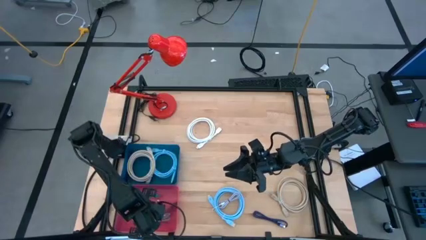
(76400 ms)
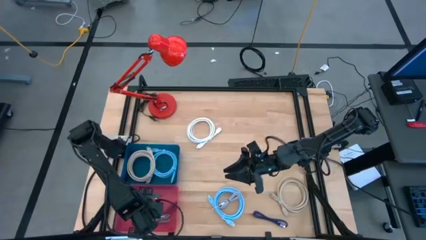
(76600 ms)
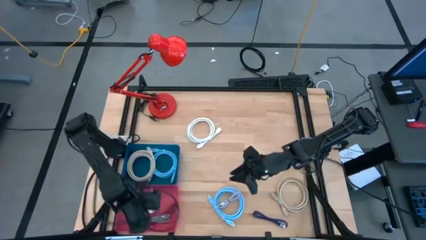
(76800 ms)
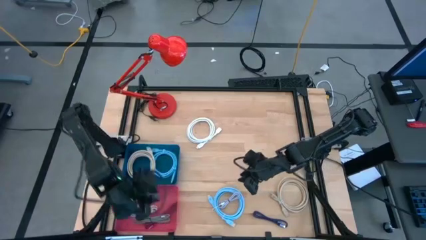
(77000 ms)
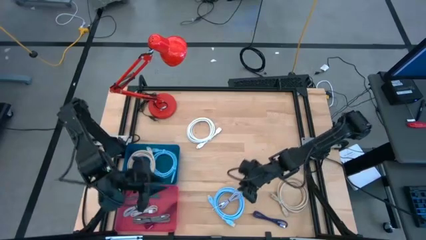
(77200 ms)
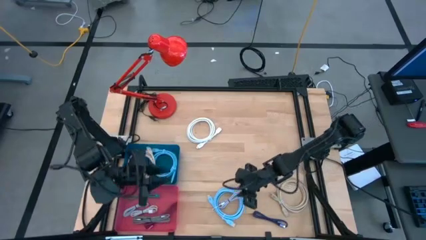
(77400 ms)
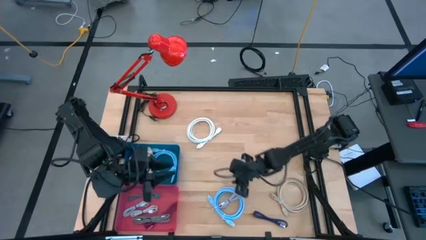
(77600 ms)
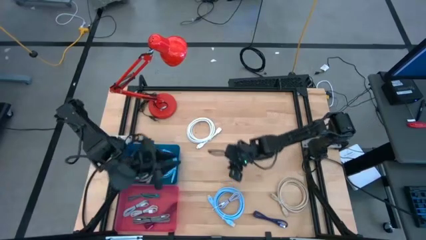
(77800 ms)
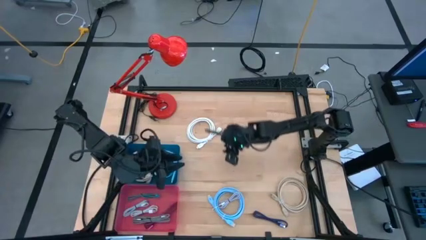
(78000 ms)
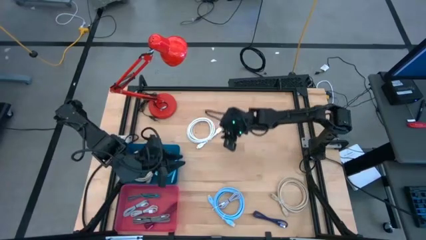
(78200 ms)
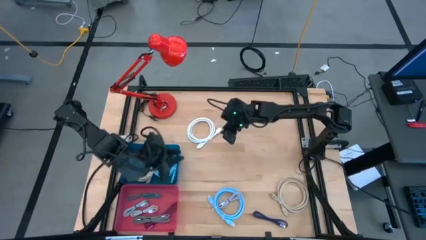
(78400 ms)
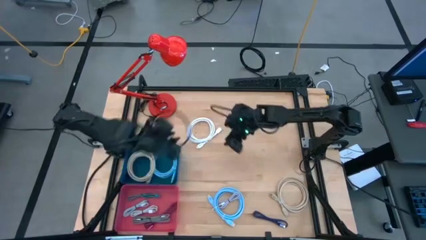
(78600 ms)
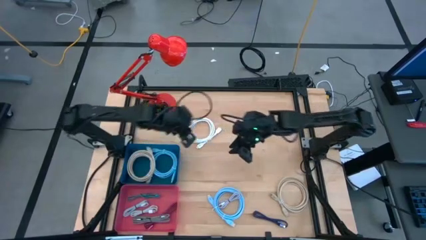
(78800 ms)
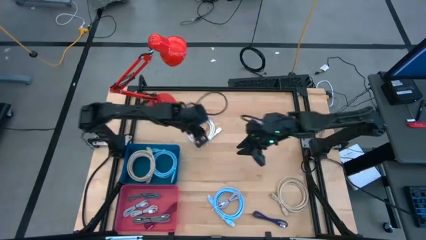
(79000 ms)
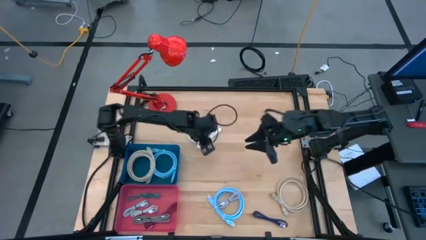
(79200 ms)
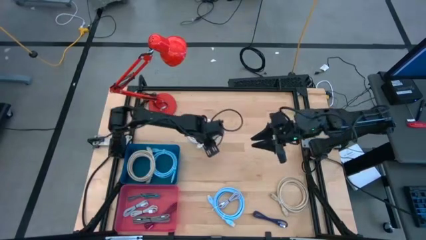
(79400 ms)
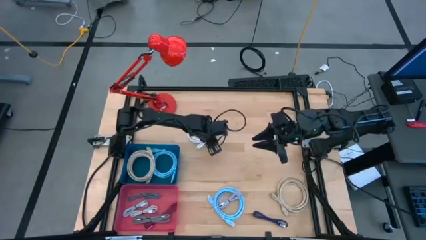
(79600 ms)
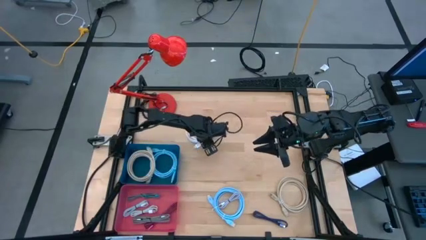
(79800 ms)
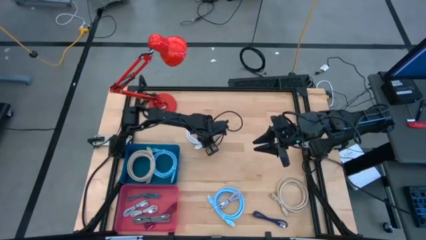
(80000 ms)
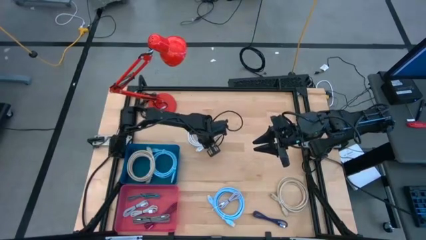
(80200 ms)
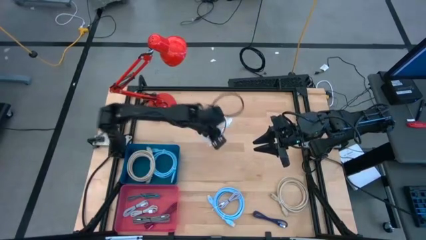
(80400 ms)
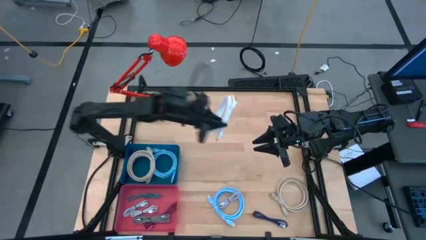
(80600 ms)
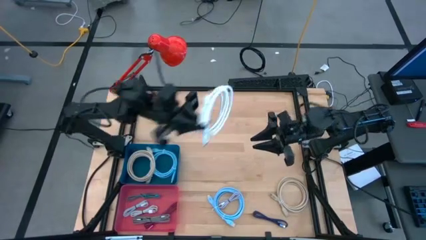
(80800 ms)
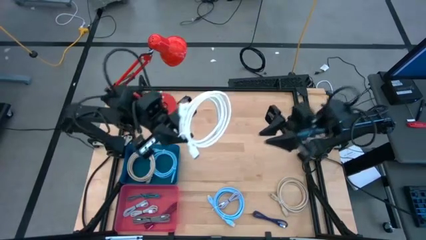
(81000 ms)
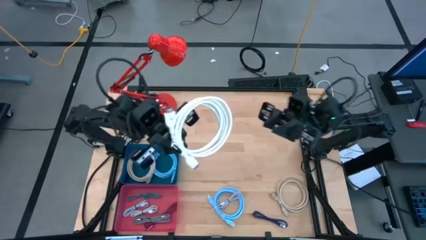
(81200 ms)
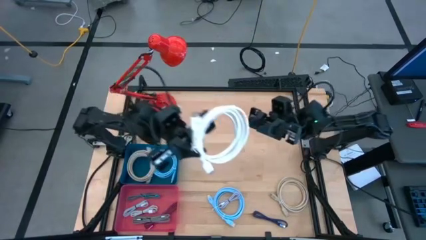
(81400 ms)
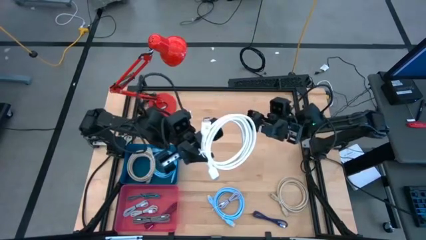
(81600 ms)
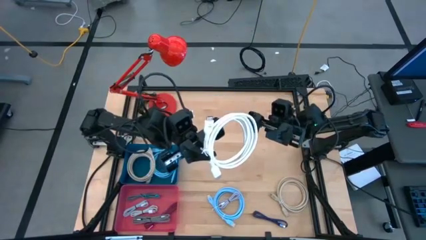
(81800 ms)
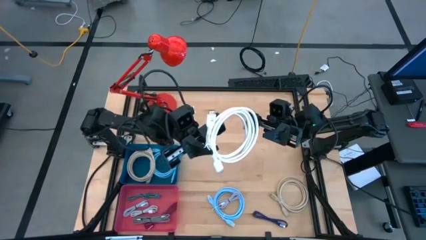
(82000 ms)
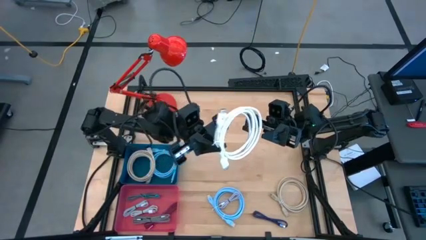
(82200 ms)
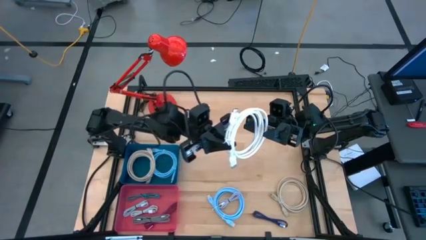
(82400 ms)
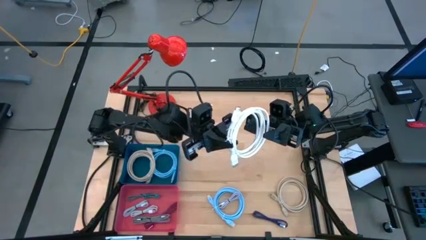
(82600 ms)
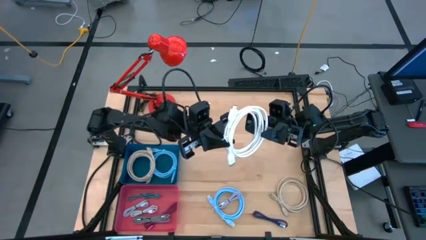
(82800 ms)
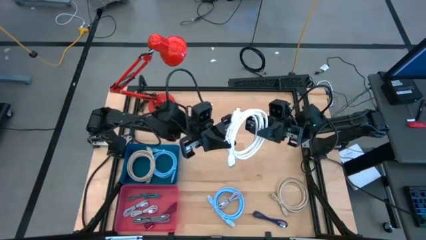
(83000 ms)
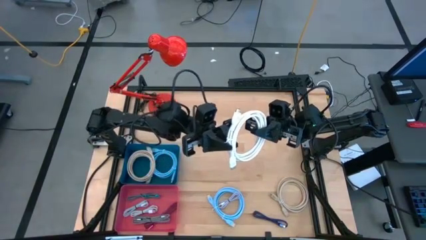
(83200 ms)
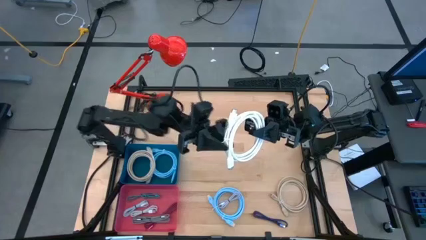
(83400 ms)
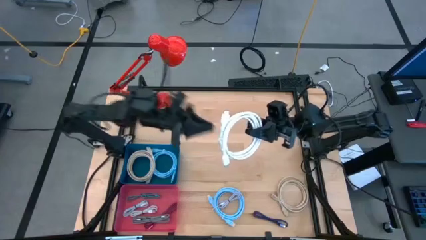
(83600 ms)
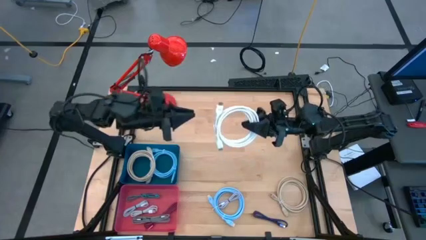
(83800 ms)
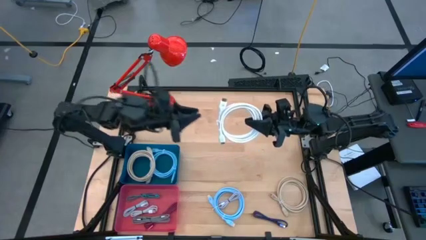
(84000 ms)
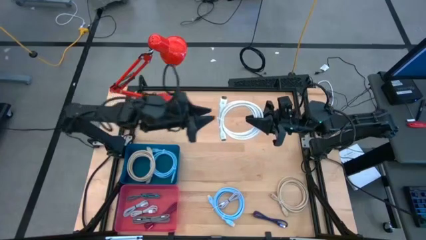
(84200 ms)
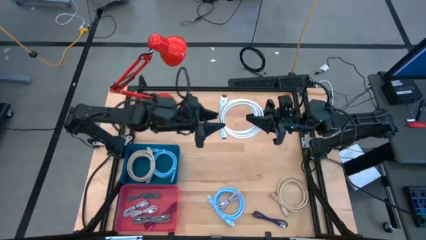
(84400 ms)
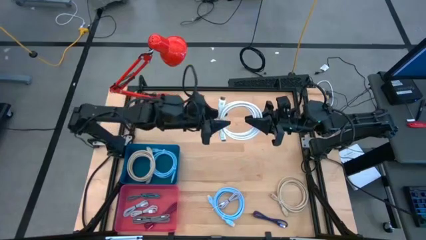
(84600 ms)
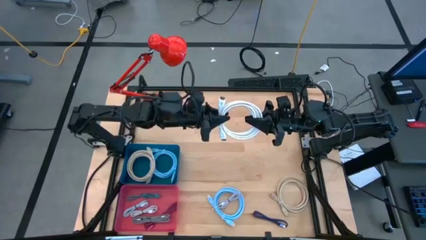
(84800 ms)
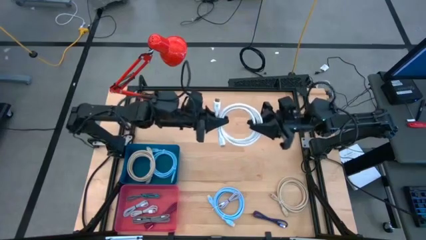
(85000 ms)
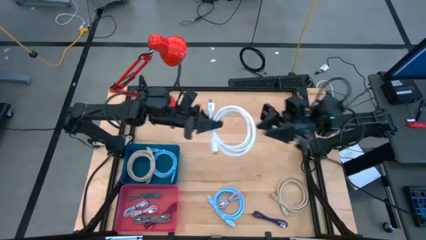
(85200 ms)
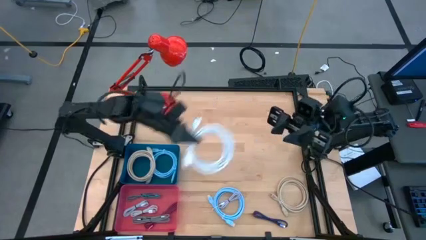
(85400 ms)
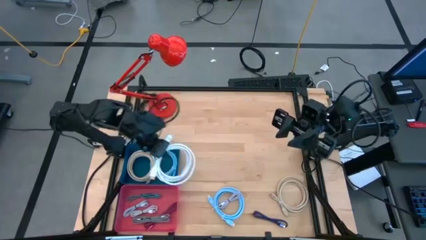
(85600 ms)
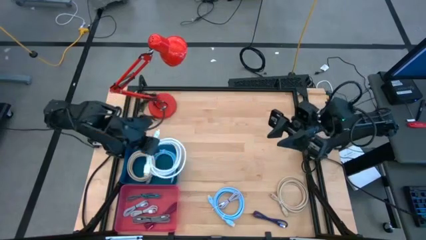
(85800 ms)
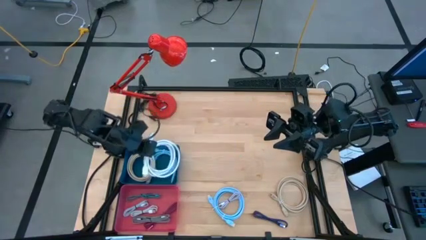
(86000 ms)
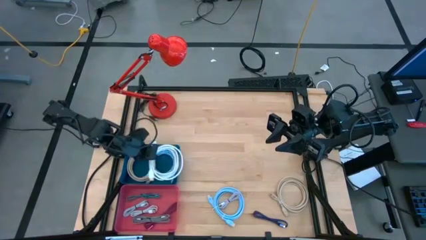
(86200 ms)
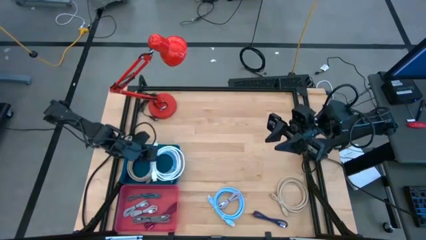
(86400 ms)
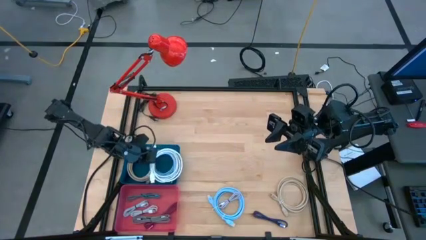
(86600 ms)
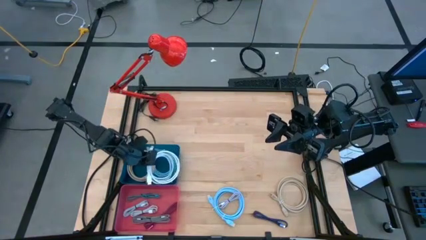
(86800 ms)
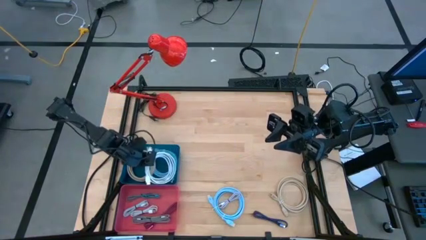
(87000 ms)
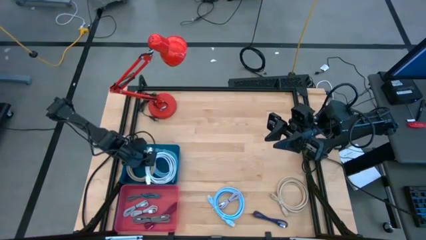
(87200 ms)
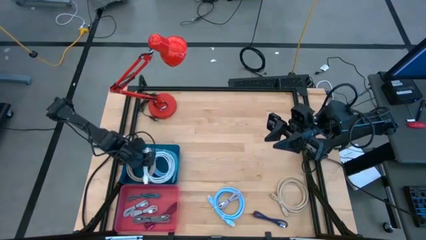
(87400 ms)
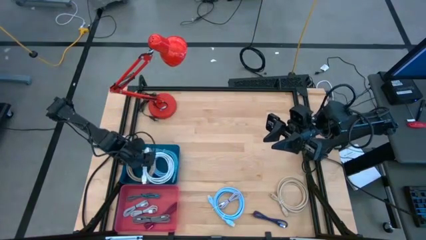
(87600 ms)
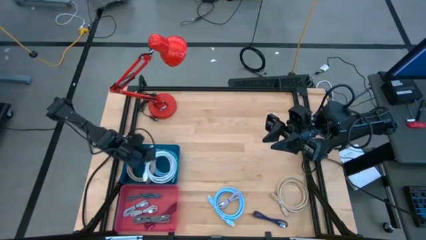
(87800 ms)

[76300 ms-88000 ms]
Task: Pick & Place USB Port
Put the white HDMI cable into the blue bin
